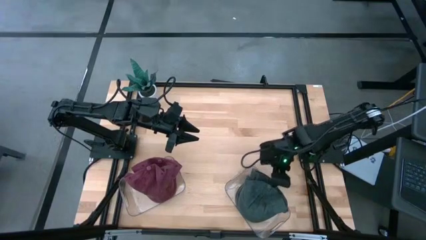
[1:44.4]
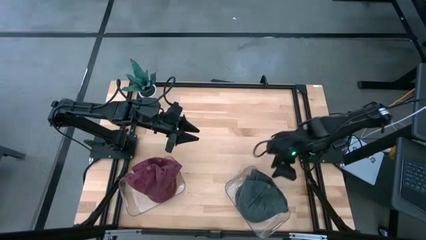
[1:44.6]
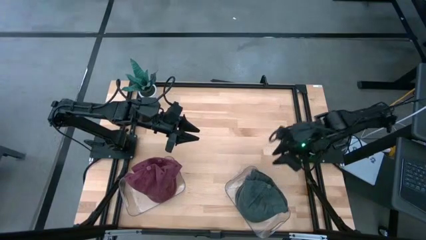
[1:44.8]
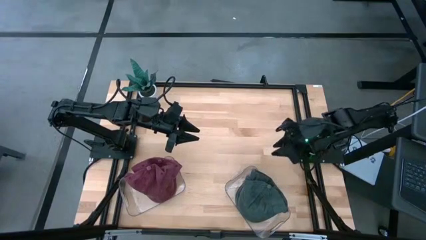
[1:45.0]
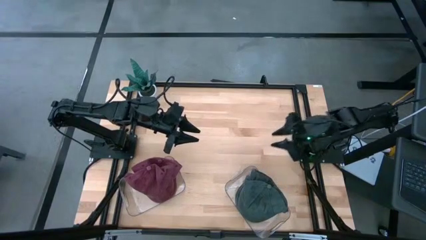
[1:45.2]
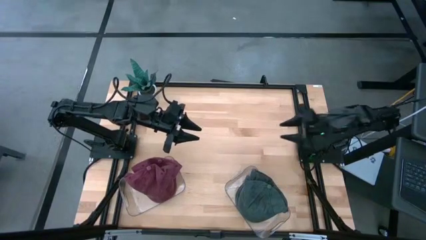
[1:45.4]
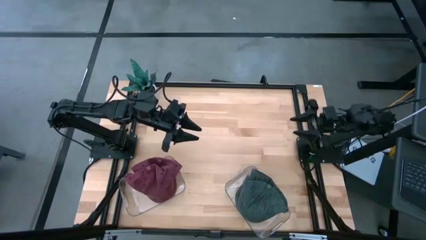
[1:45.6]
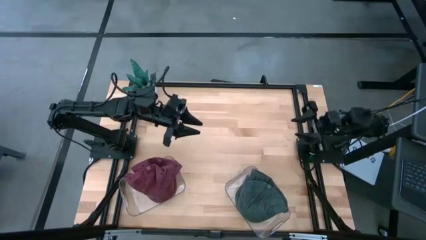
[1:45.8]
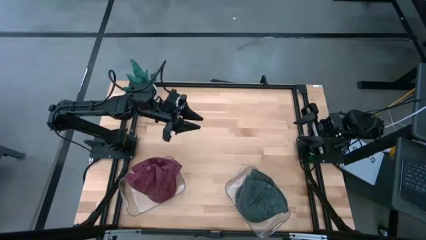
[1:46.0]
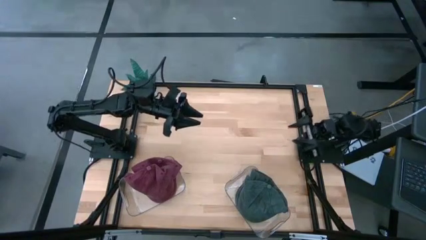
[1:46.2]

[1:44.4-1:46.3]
Task: Pick & Place hat
Return to Home Position

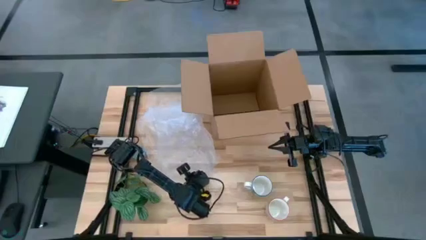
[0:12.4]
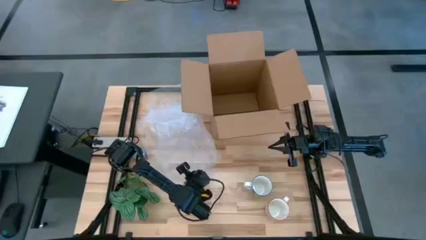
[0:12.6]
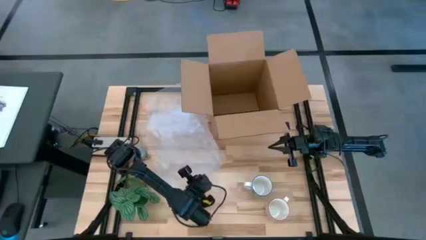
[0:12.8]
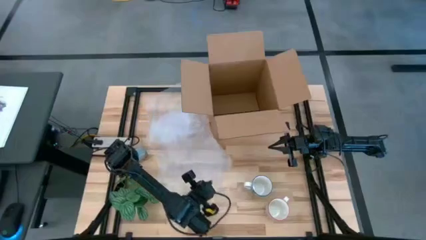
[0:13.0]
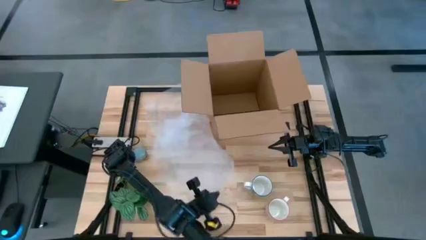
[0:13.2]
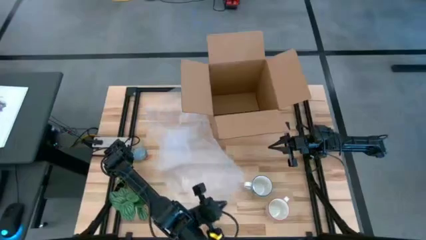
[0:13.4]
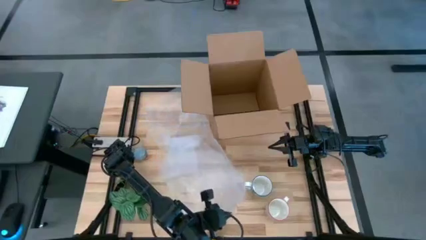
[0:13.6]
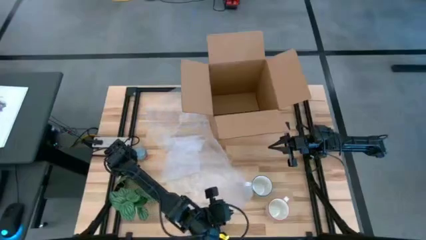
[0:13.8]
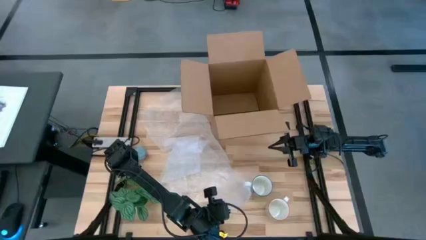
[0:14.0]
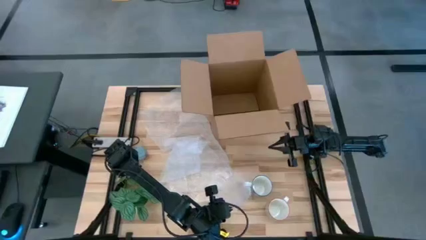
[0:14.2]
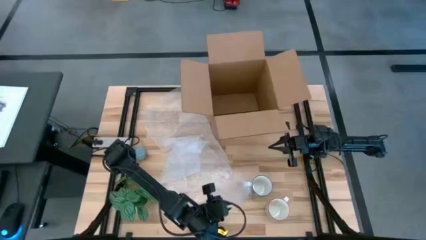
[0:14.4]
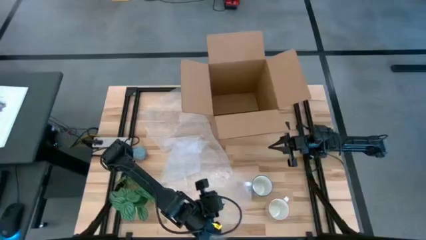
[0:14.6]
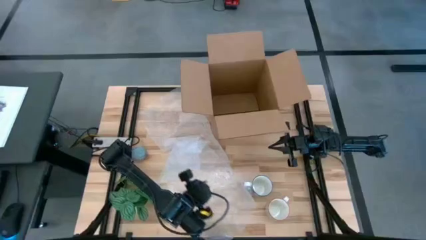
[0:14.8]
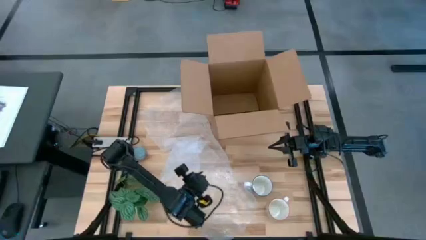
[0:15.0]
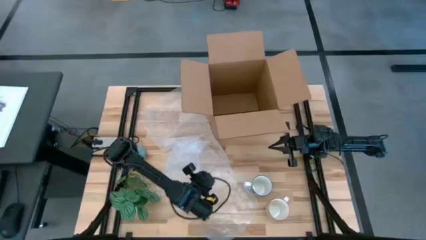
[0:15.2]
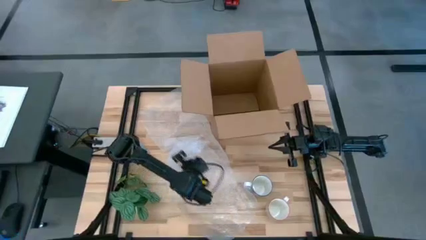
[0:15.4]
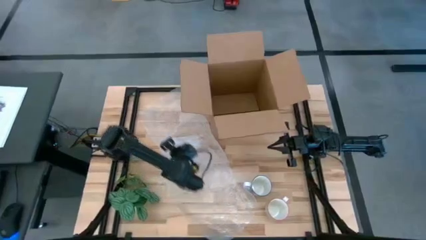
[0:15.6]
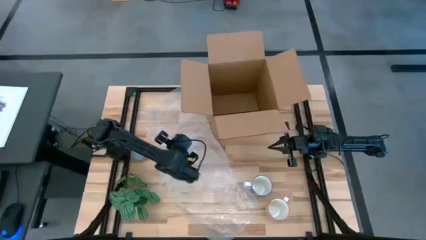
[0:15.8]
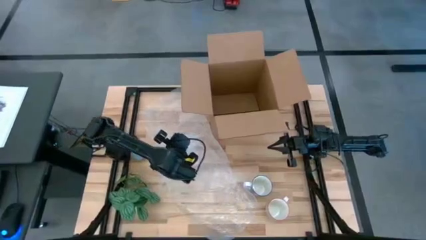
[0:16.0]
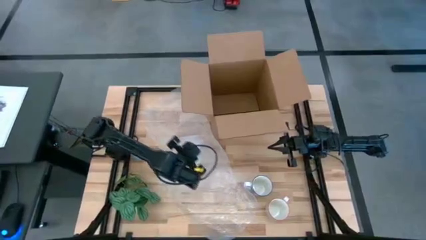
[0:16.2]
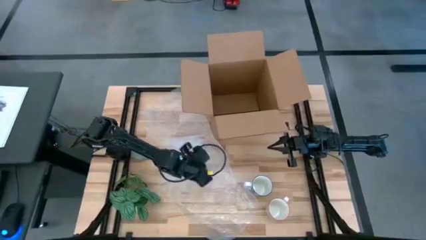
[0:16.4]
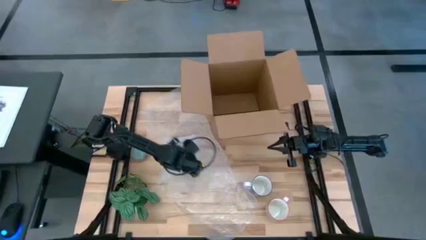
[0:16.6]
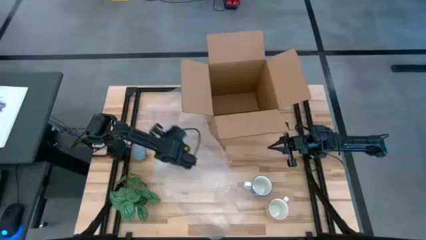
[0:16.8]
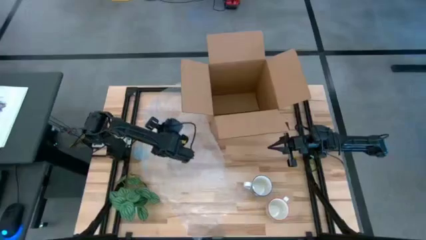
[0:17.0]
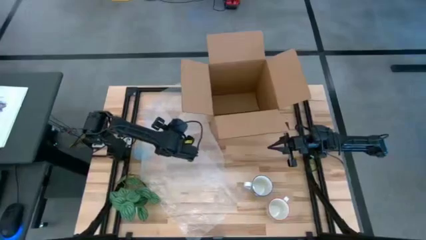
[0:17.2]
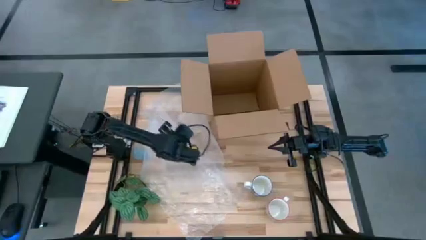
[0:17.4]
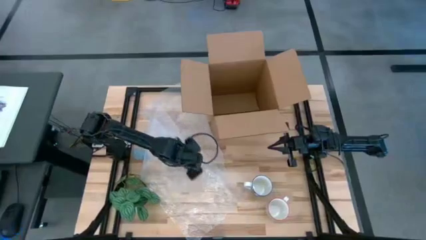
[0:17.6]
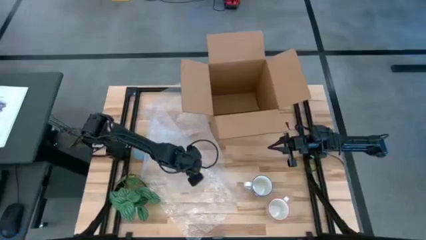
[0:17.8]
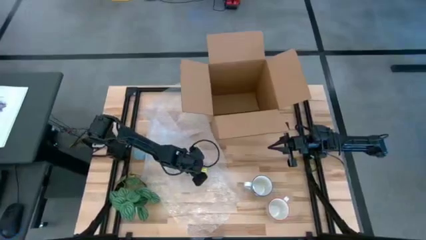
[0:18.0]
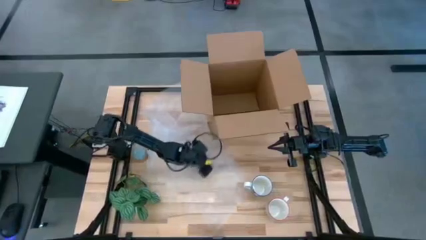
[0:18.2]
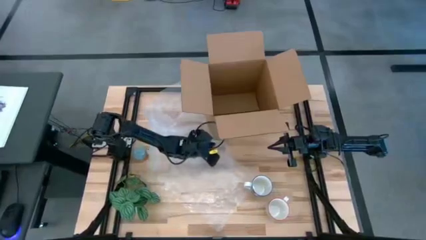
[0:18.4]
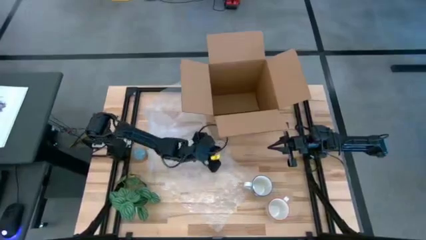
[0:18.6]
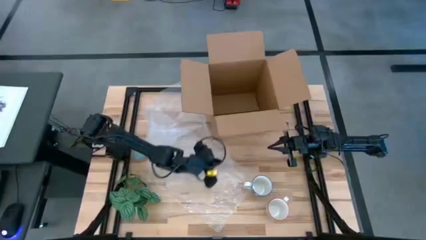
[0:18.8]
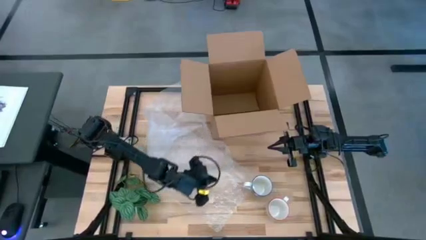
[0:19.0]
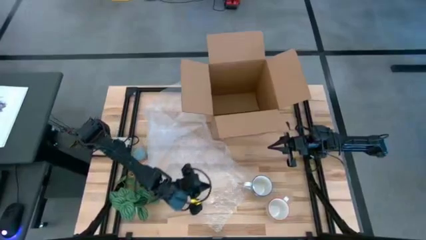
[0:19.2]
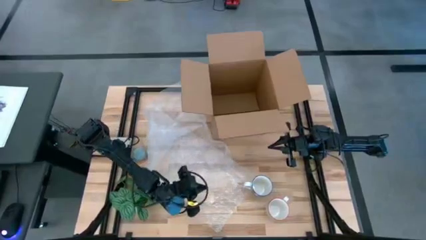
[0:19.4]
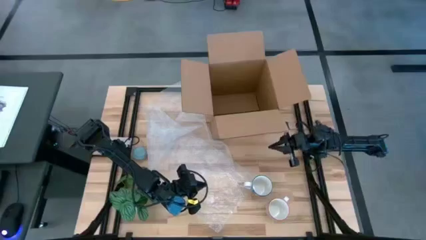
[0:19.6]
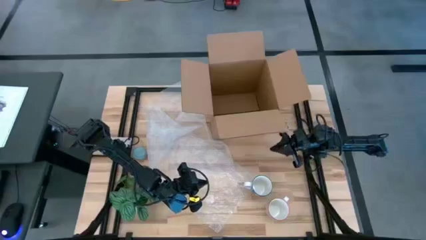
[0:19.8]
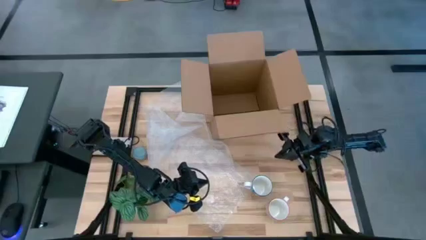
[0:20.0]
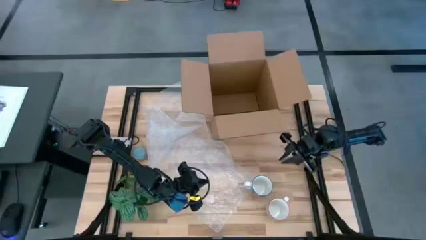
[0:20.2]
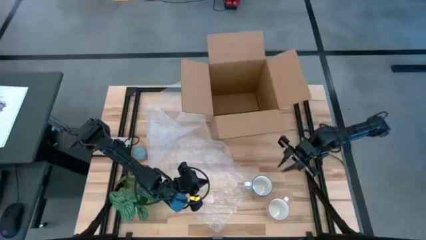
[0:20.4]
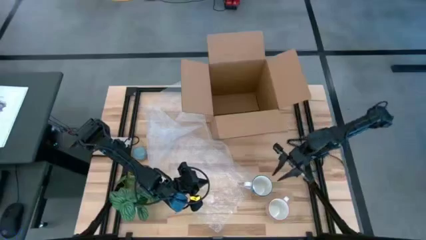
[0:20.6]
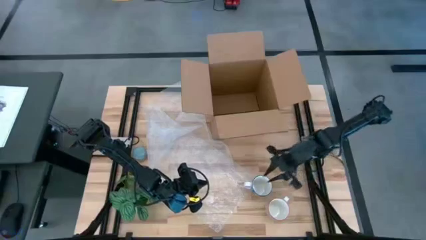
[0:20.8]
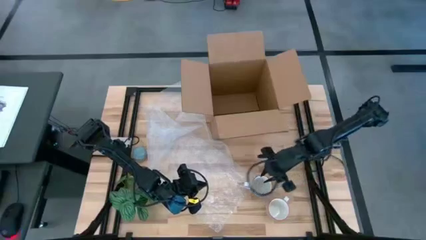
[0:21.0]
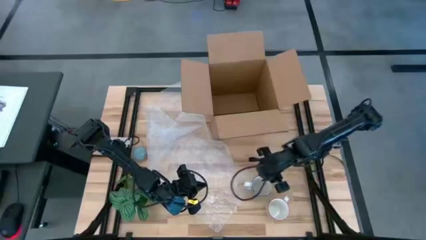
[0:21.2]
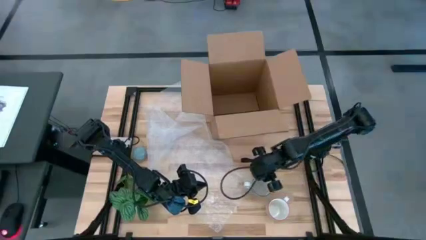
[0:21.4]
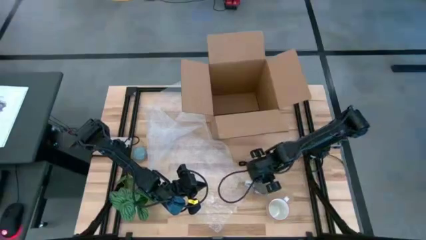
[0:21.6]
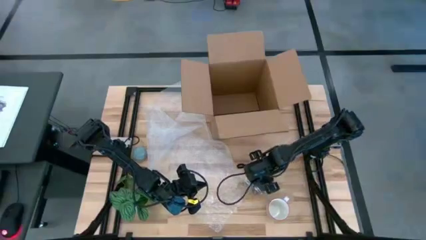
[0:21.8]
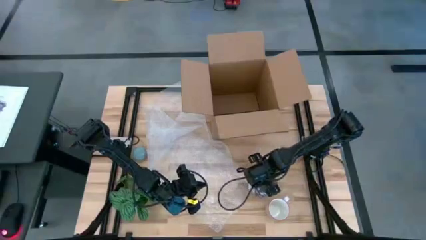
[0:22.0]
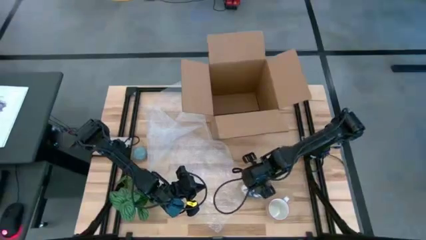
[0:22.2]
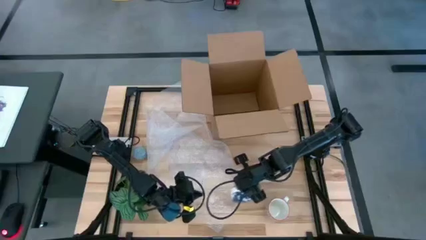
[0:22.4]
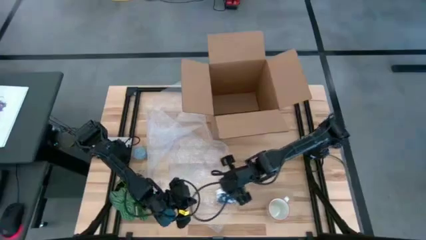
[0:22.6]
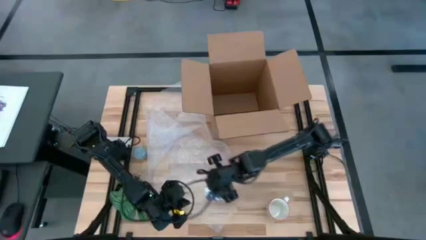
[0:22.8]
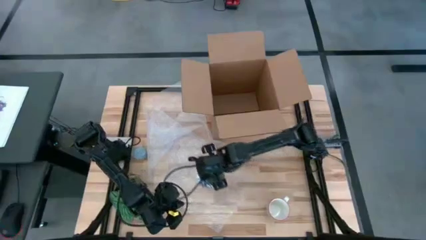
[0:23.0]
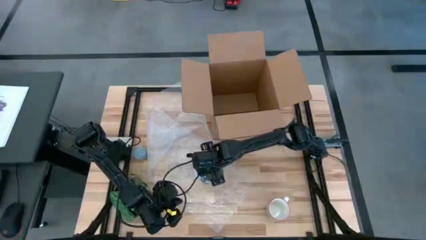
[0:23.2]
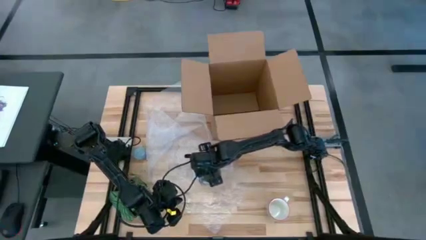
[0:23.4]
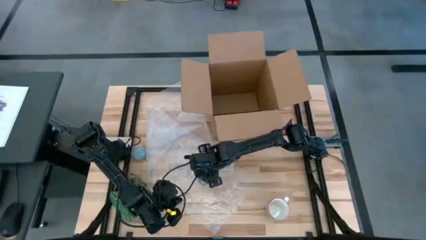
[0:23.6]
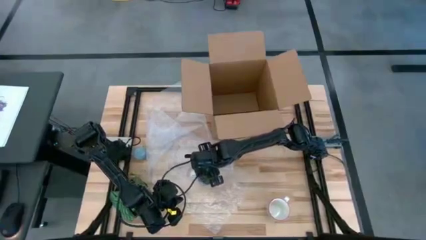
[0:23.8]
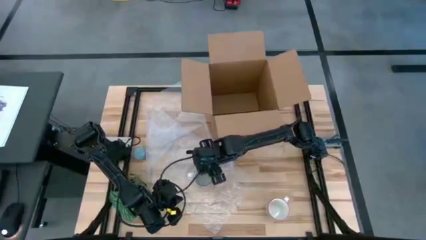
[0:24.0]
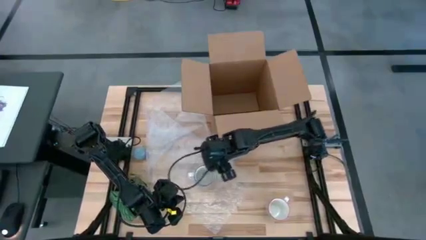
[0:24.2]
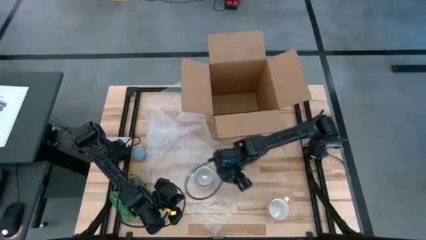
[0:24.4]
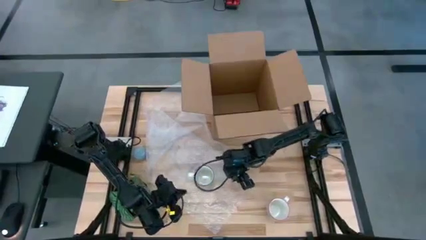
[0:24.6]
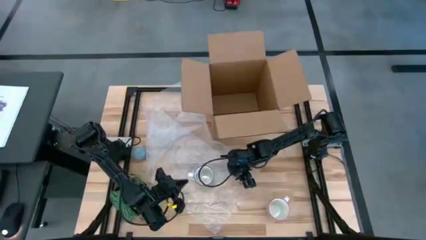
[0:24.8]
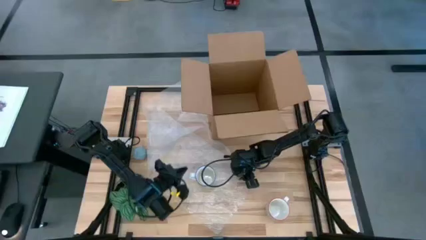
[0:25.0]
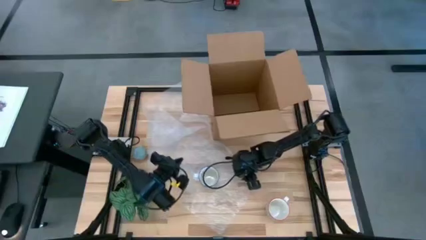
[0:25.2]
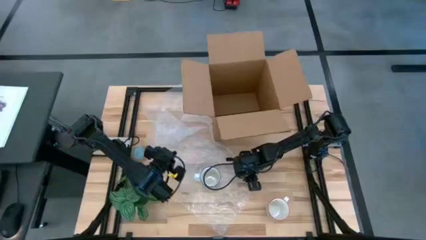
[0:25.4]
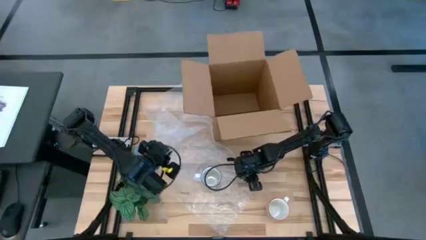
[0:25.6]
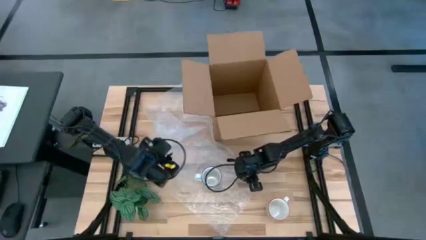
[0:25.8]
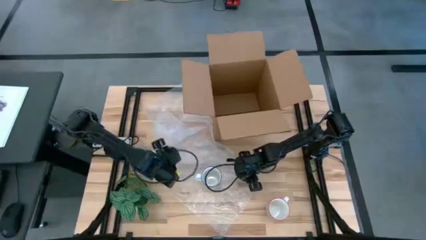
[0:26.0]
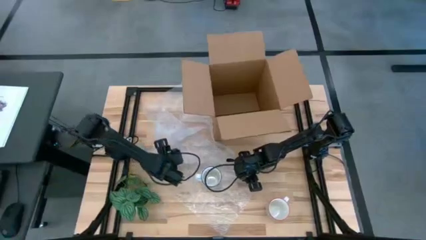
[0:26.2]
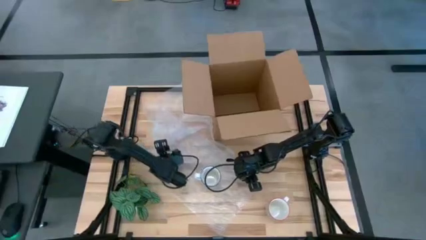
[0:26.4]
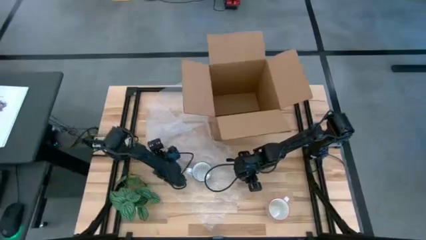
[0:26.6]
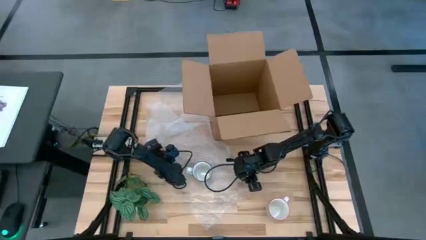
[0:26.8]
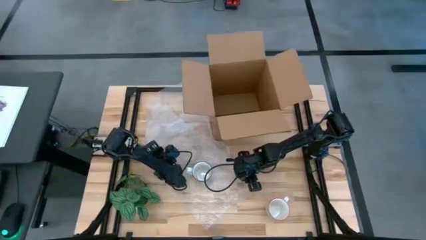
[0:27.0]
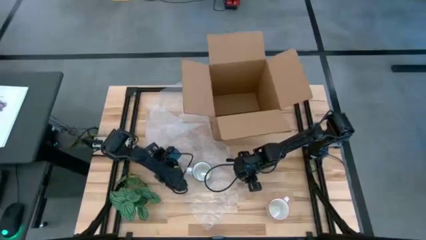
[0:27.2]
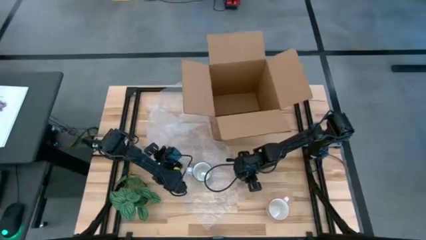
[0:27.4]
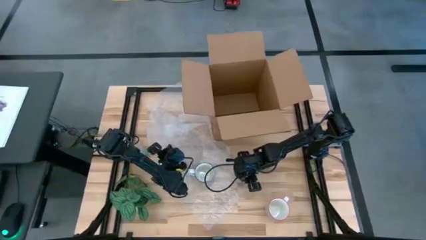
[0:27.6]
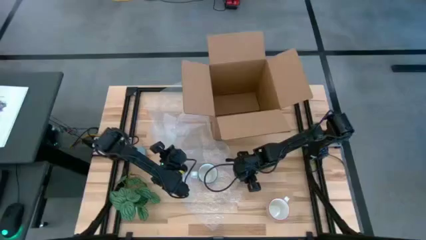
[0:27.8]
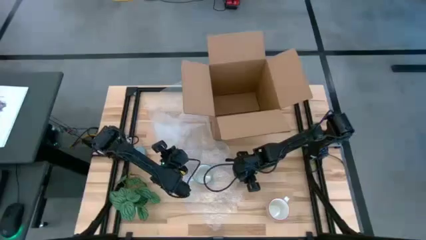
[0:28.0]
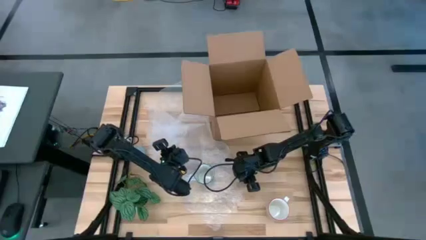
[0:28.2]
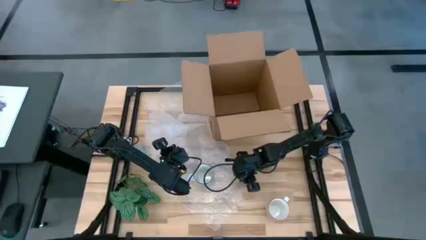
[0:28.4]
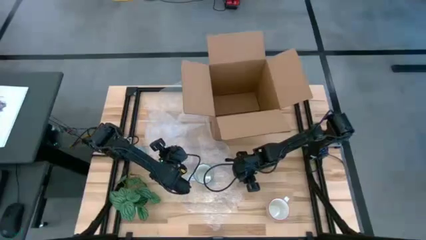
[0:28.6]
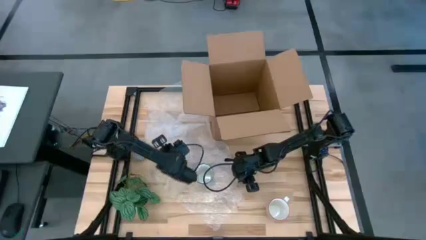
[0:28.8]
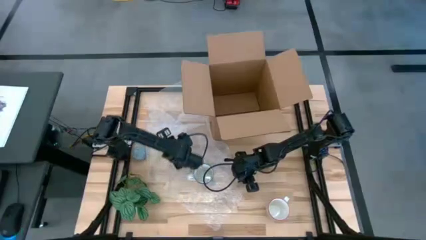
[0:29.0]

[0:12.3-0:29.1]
Task: wrap mug
Wrap the white blue mug with bubble wrap
